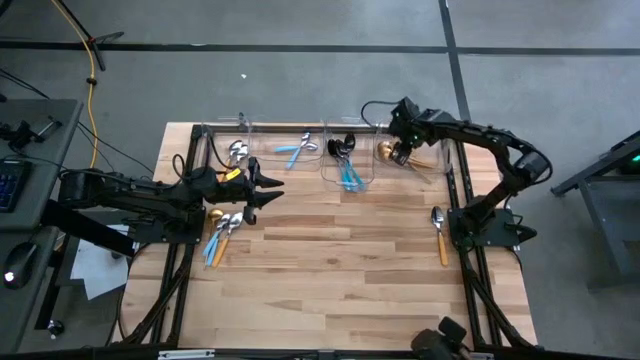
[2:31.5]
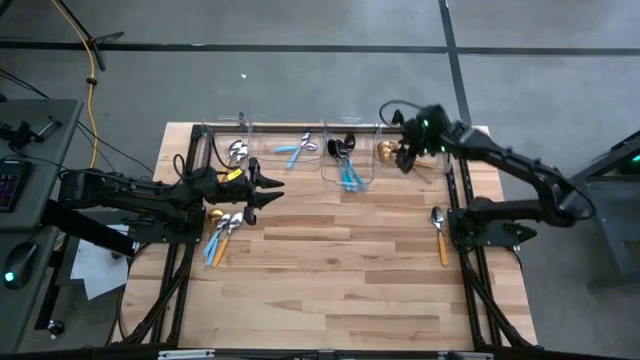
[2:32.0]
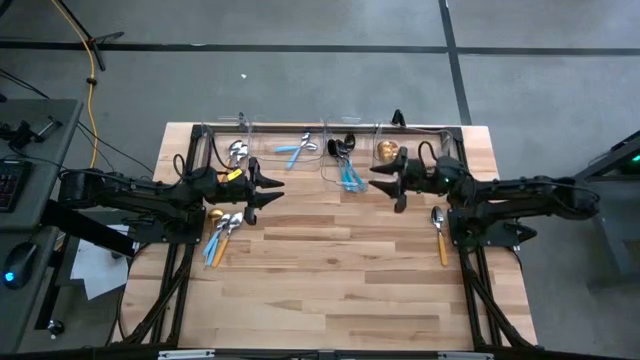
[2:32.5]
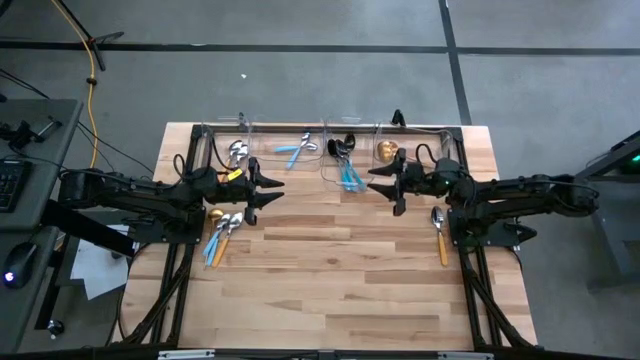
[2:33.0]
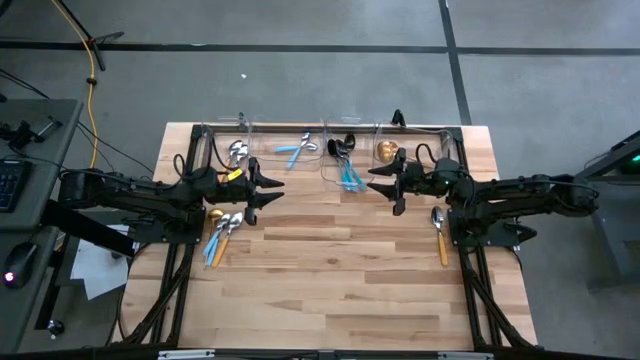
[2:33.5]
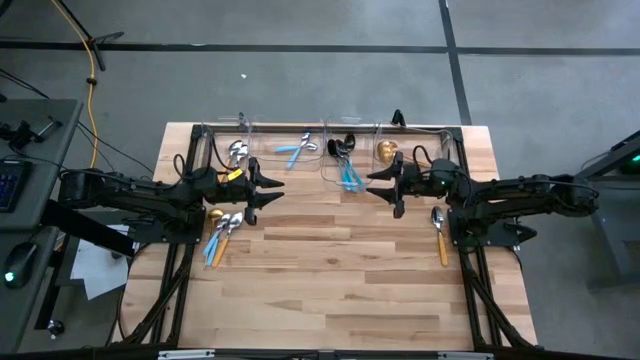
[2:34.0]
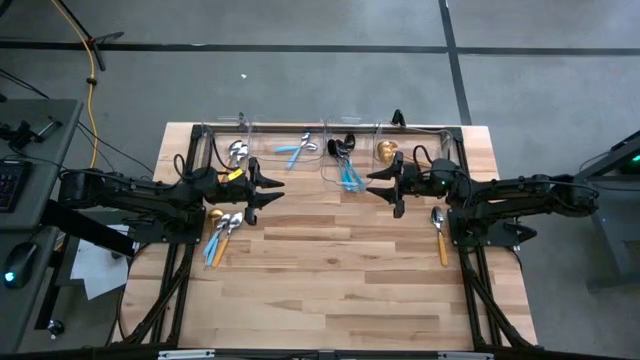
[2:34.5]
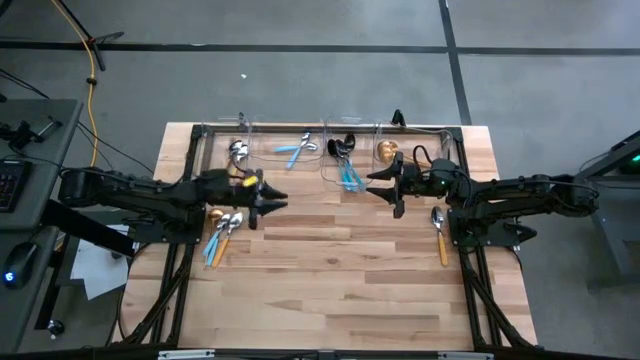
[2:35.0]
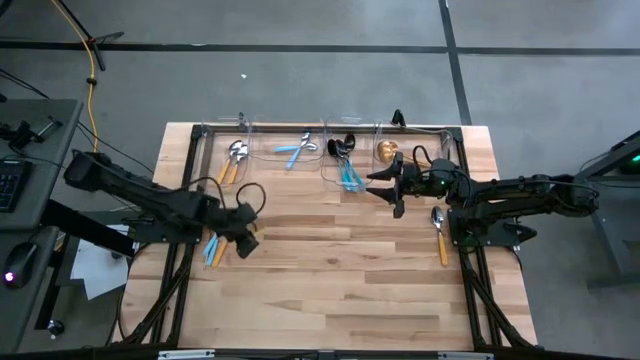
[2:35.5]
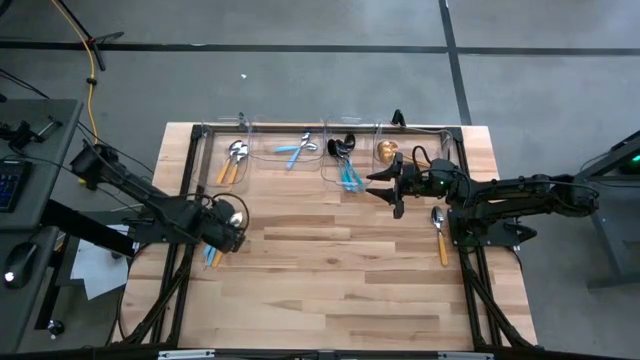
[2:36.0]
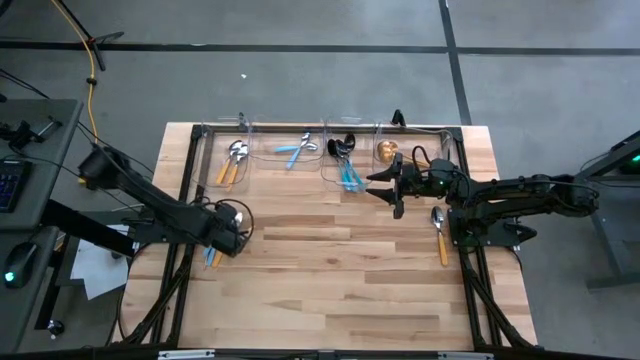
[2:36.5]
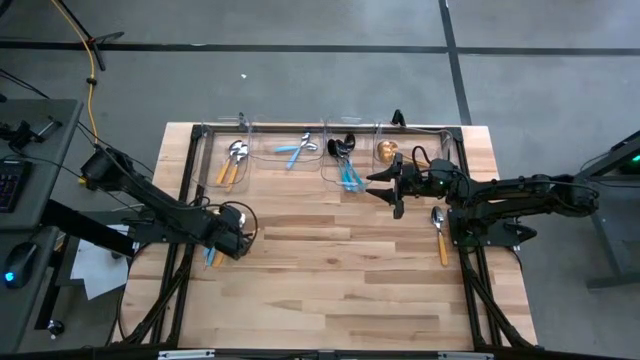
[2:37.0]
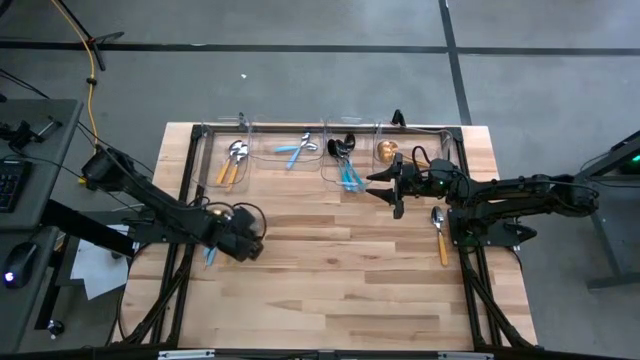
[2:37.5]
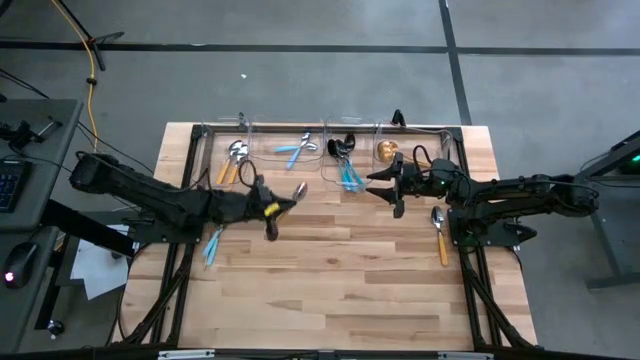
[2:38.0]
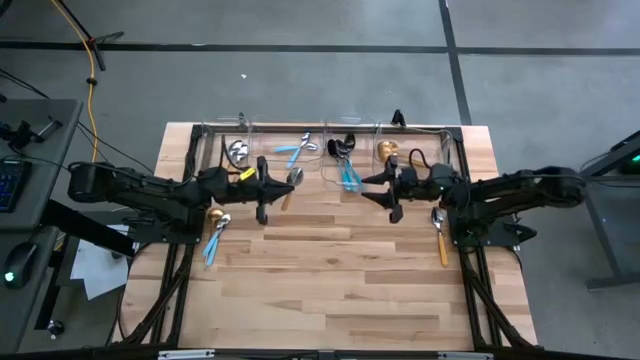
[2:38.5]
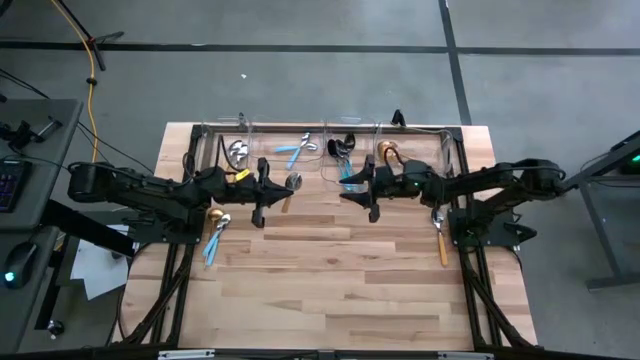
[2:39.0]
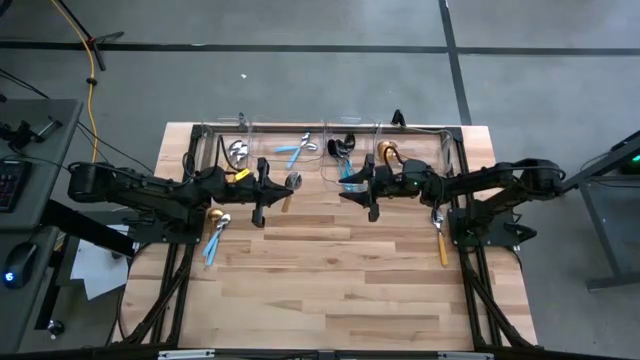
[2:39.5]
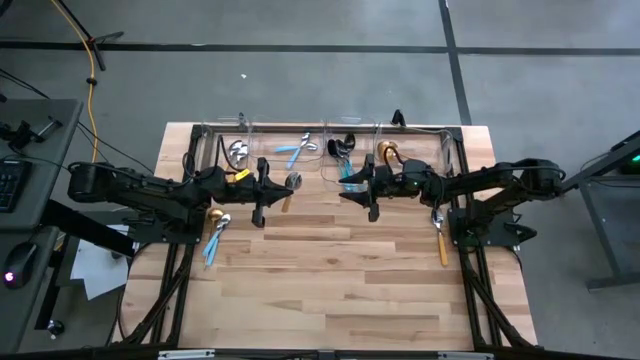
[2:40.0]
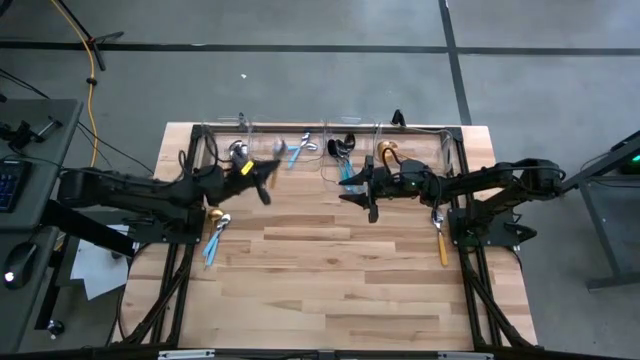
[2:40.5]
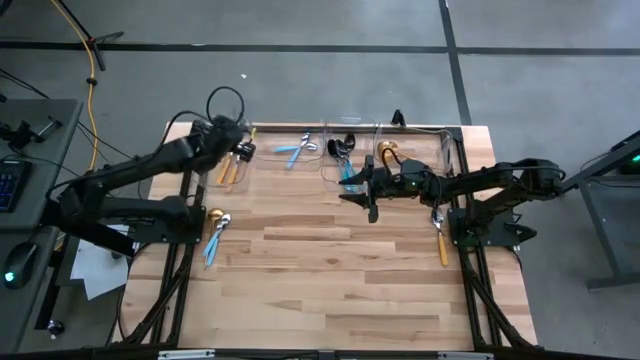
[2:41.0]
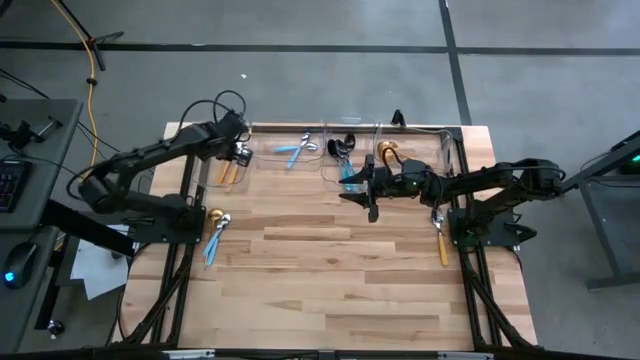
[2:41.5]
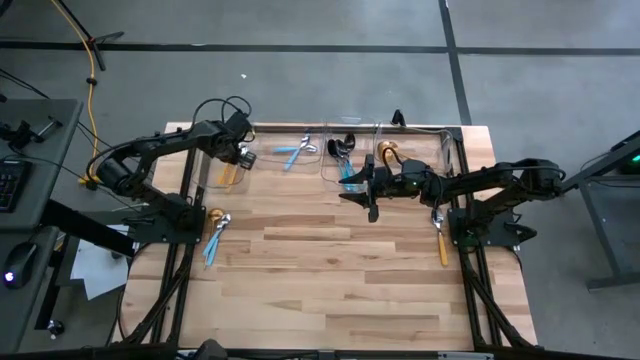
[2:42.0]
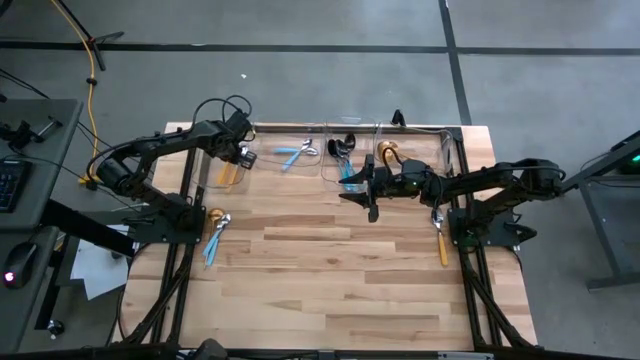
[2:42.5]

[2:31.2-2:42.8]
Task: Sort silverware by color (type)
Put the yellow spoon into the left transparent bin

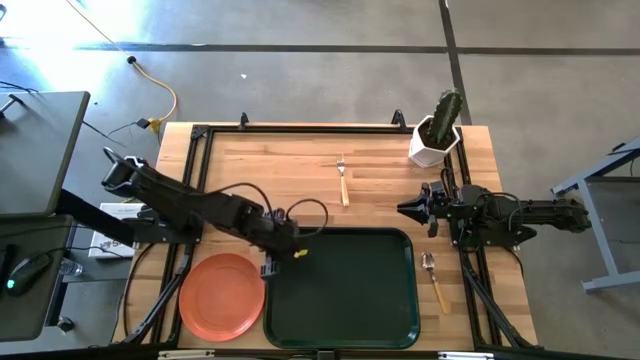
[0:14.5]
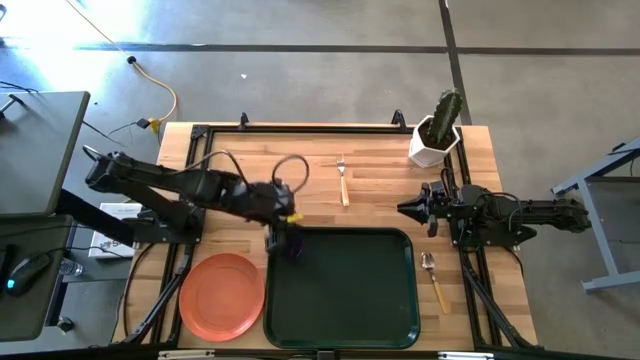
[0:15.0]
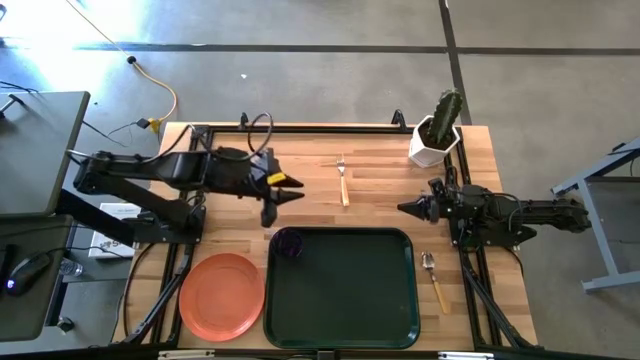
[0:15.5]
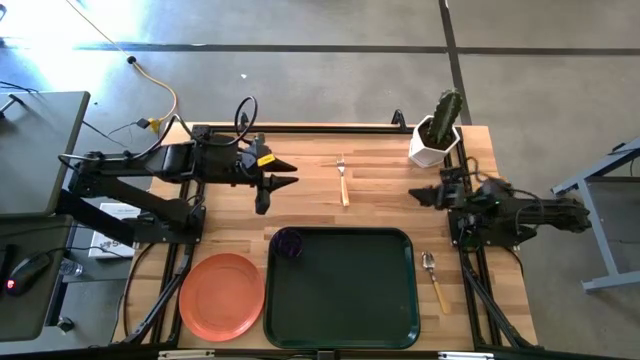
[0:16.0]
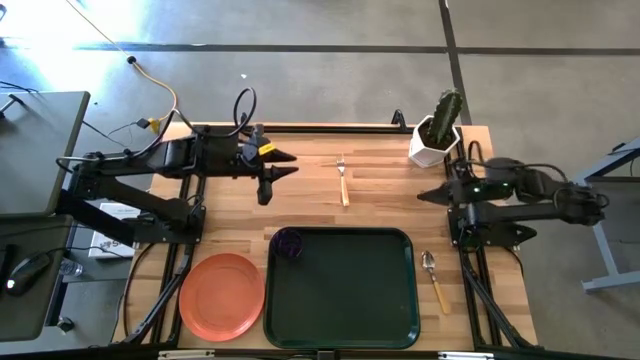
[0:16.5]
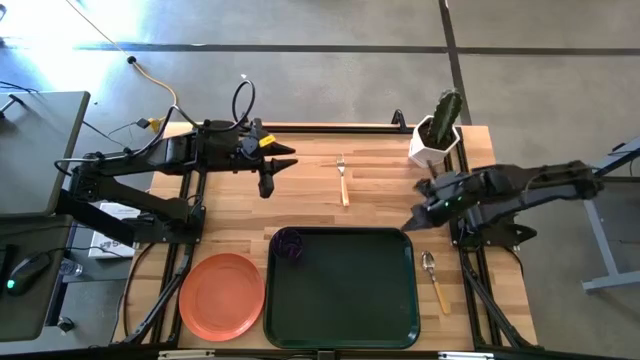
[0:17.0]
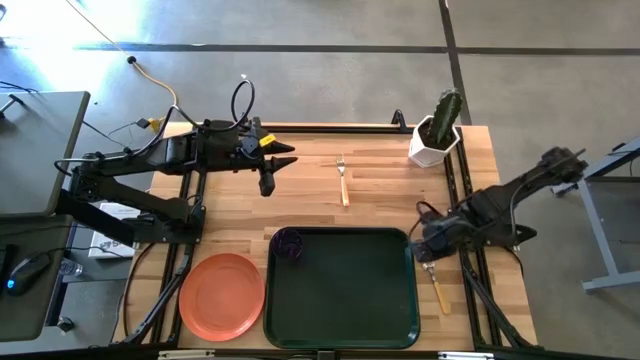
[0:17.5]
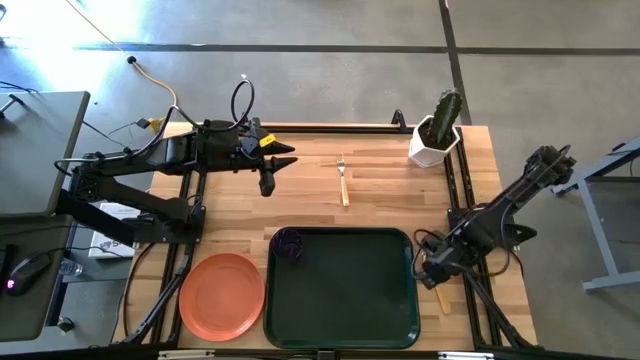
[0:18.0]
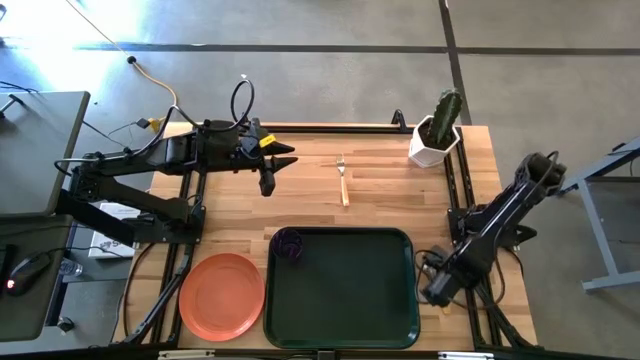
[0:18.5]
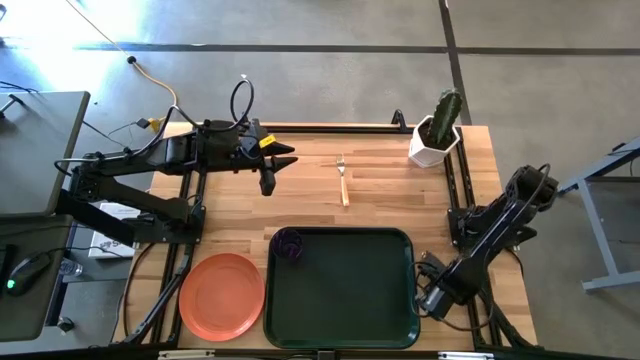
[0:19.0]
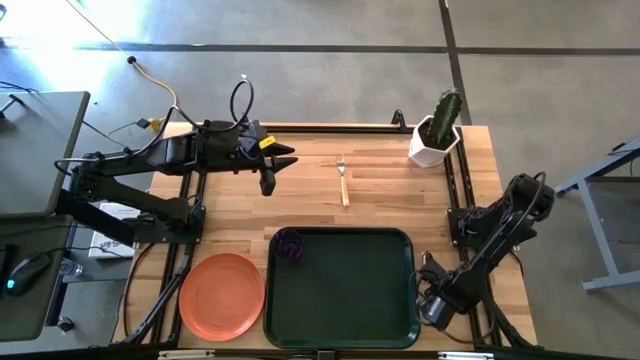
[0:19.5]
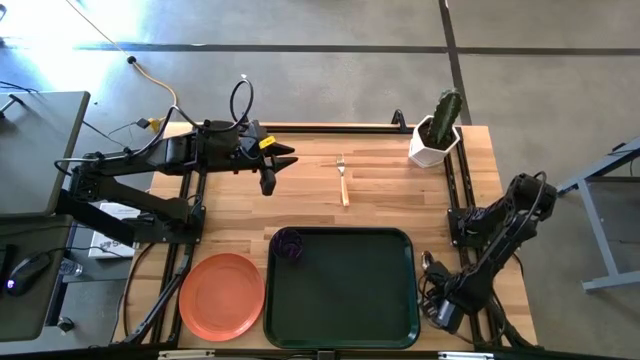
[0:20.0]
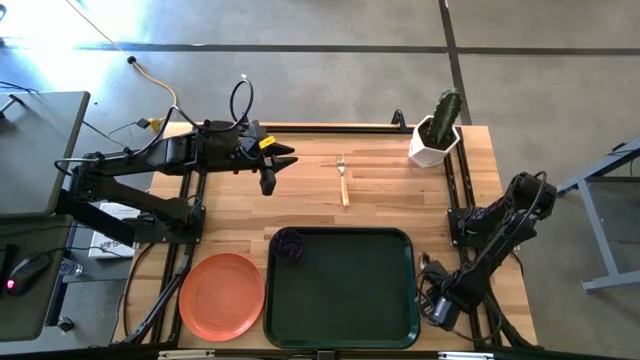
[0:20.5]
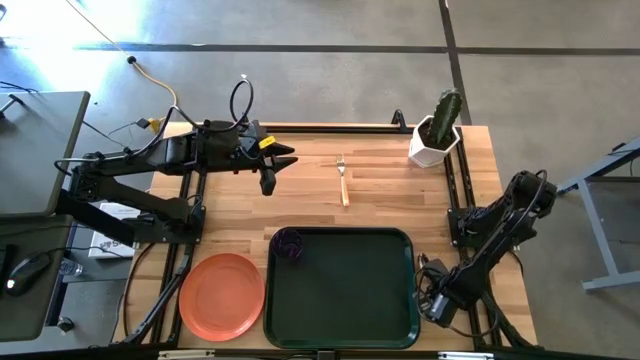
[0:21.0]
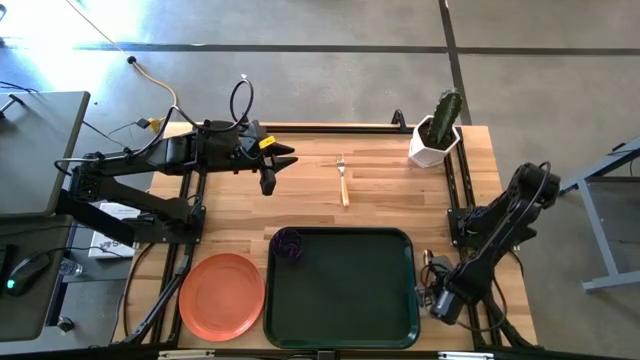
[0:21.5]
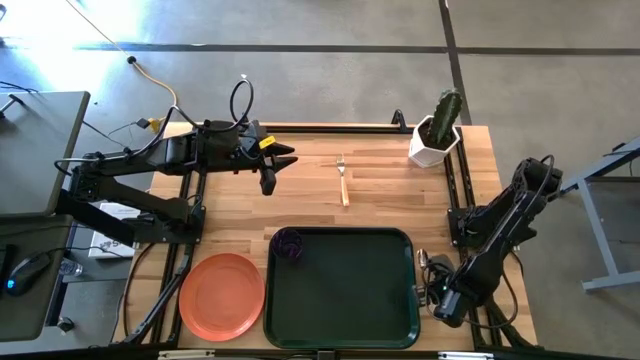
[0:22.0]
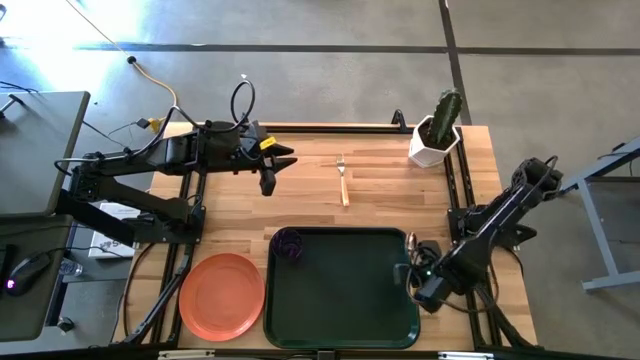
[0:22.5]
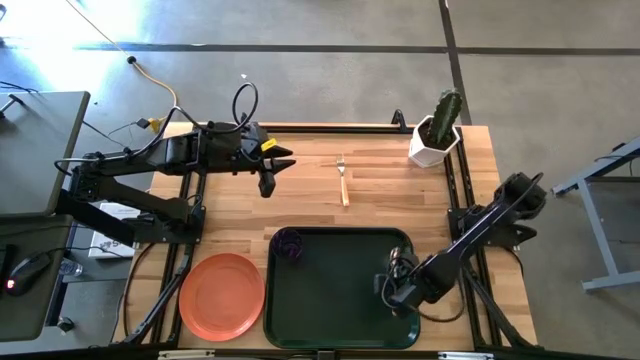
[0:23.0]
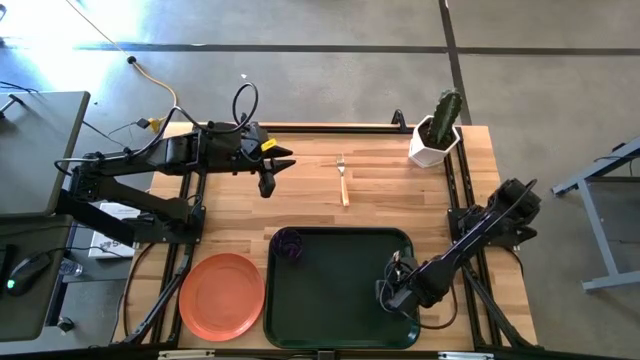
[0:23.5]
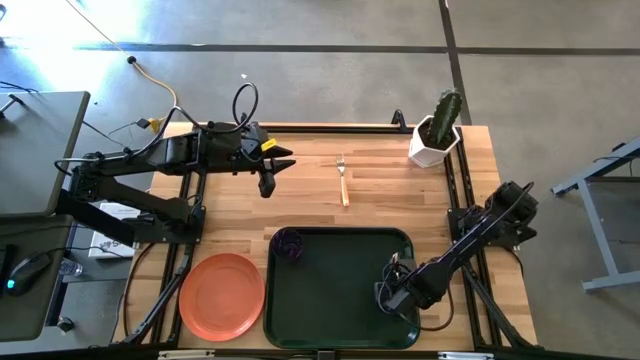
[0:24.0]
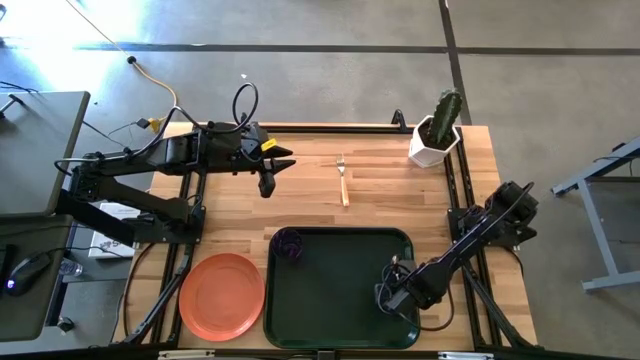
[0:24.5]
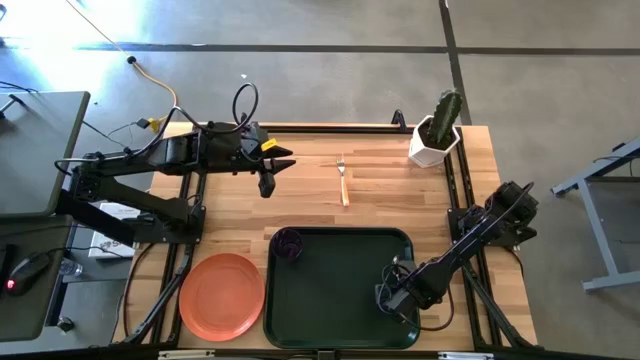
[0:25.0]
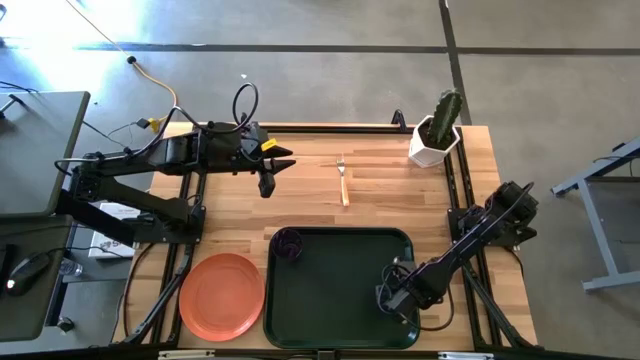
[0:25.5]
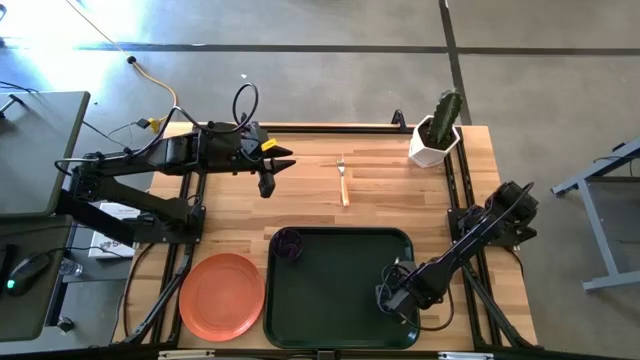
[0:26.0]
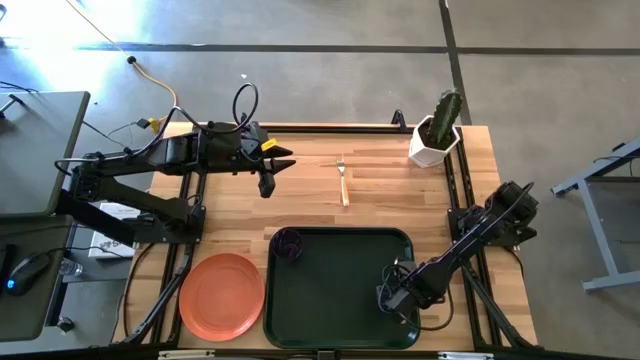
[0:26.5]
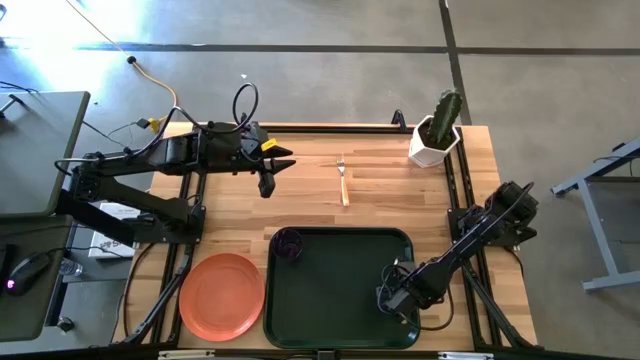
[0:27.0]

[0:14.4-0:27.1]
Task: Pick and place plate/cup/fork/spoon on tray
Put the orange spoon on the dark green tray
